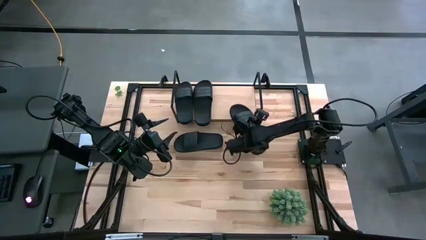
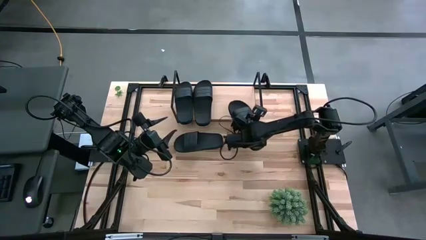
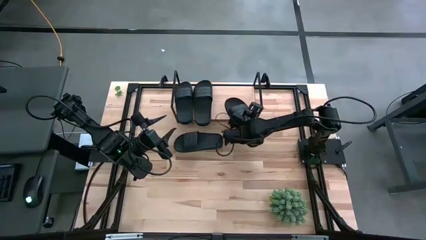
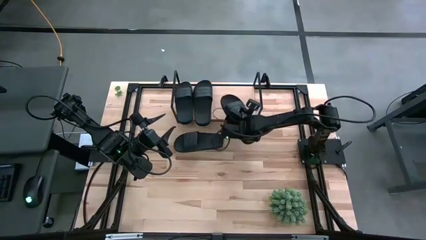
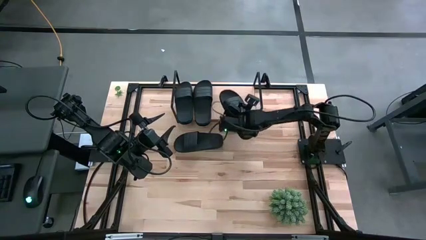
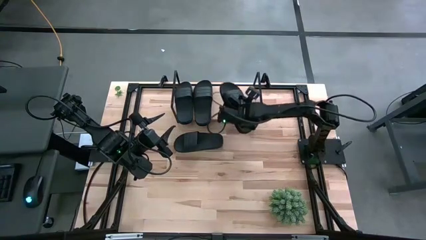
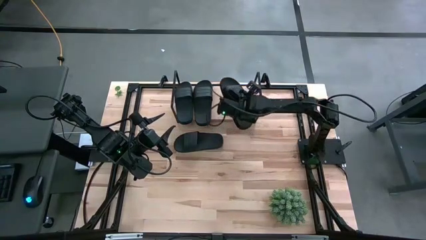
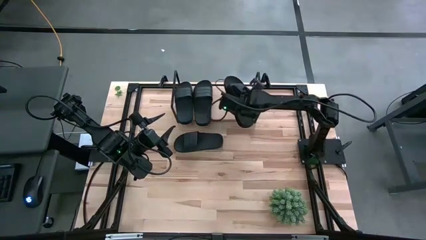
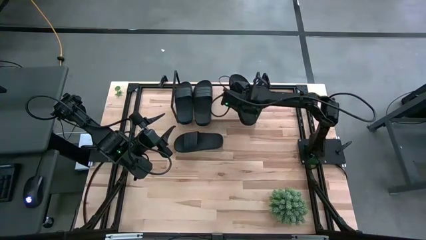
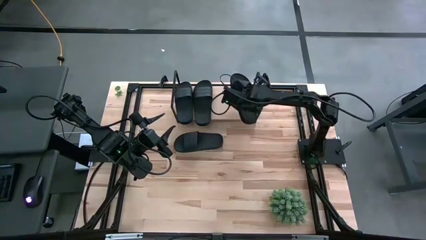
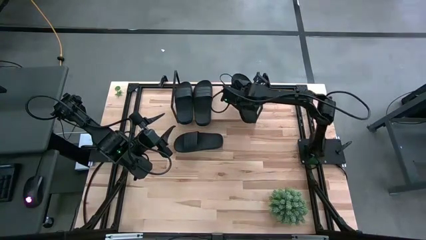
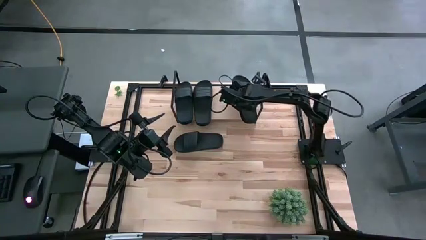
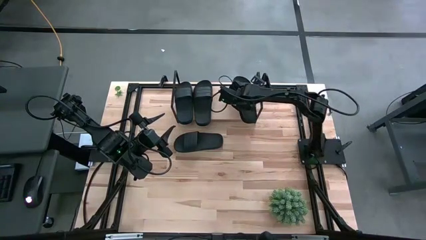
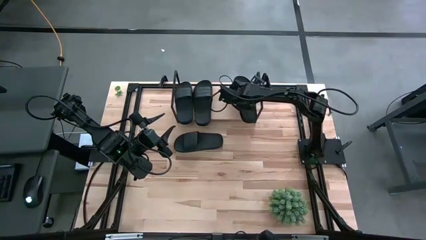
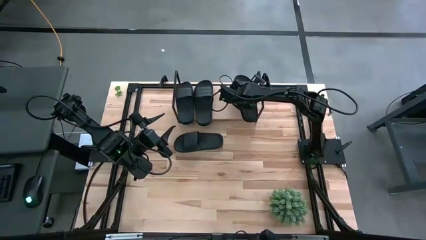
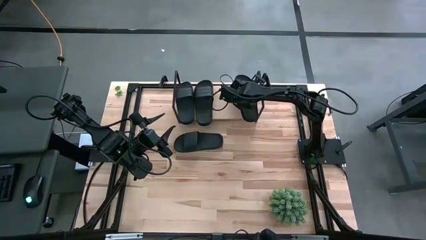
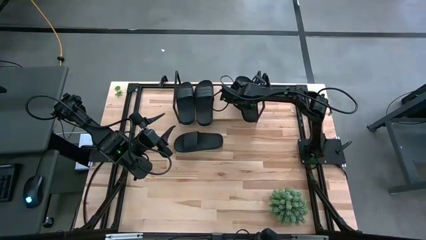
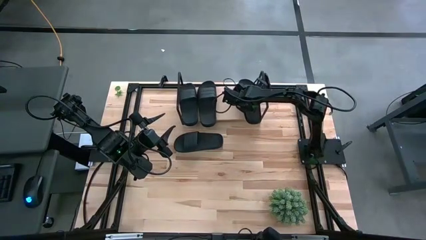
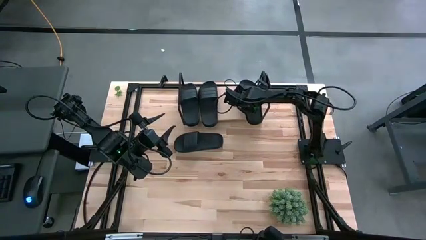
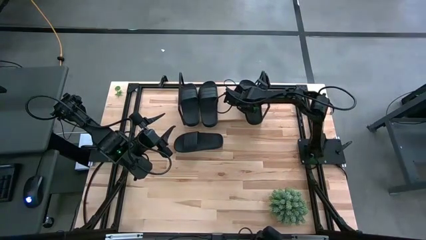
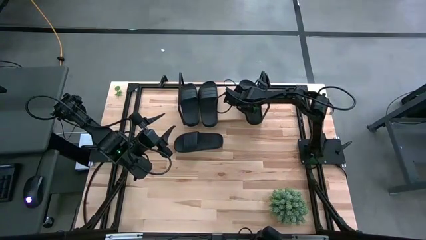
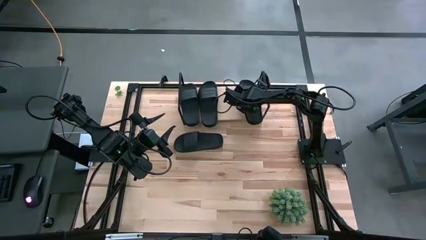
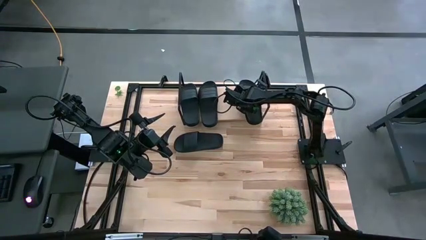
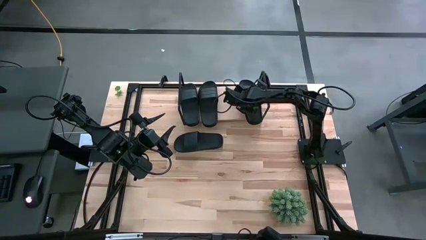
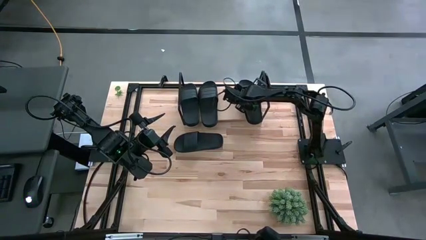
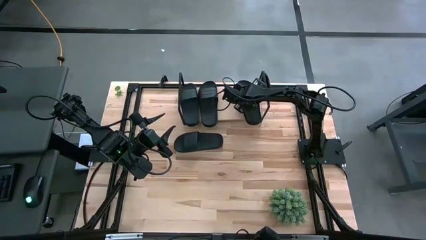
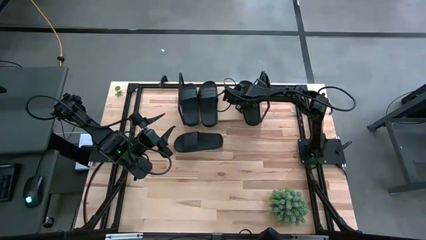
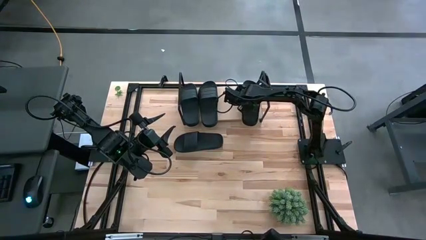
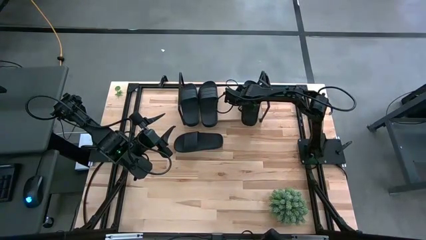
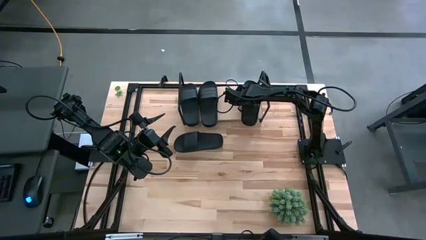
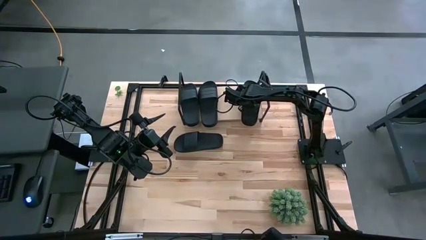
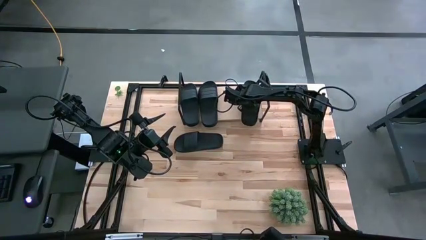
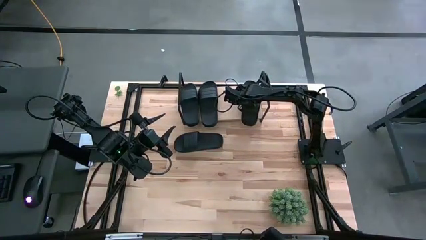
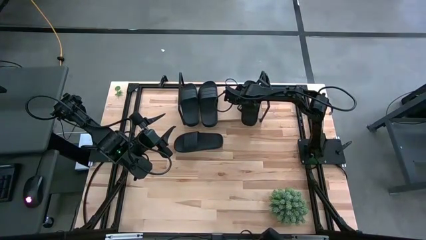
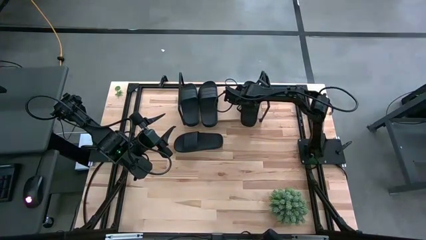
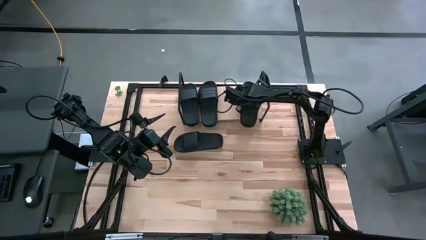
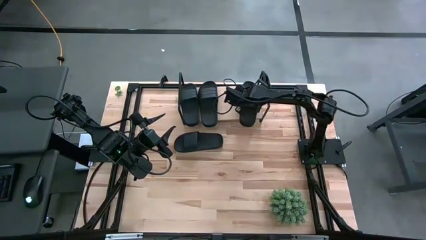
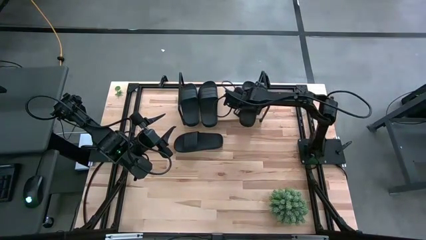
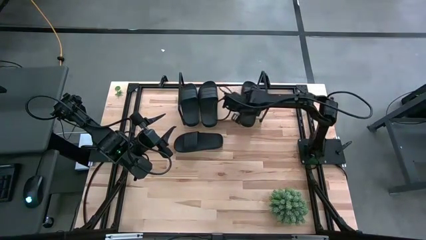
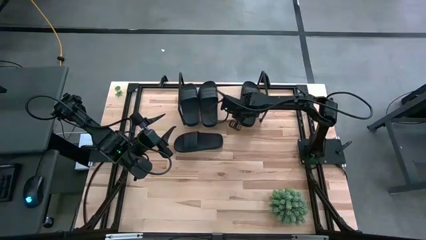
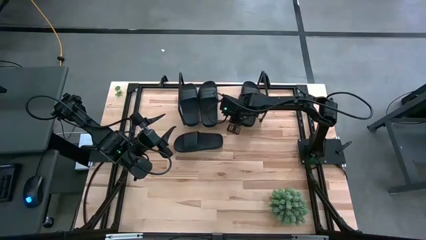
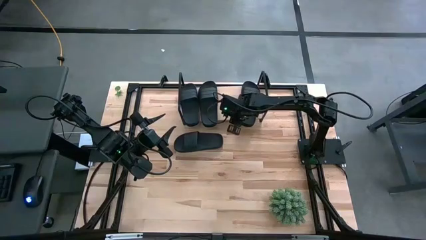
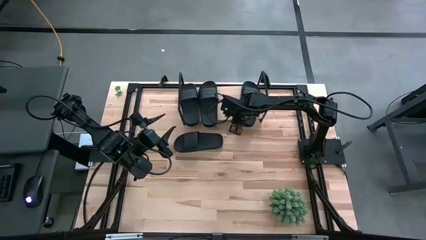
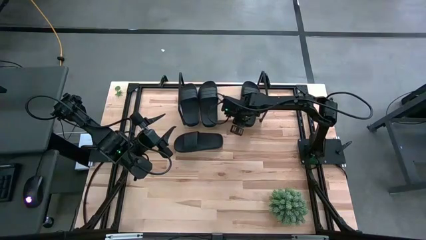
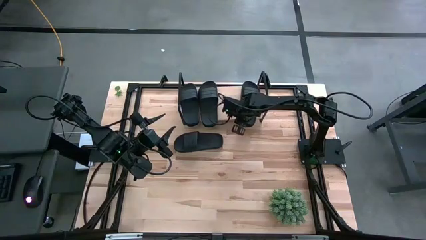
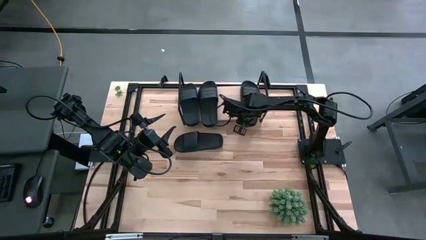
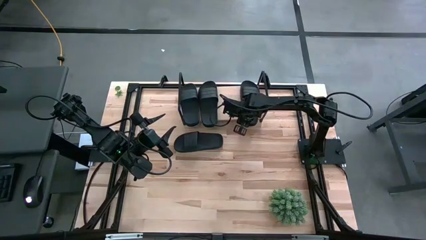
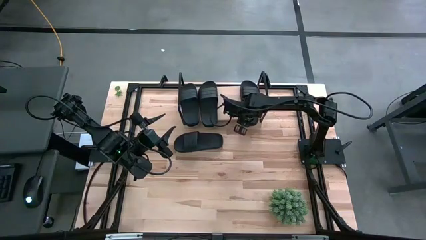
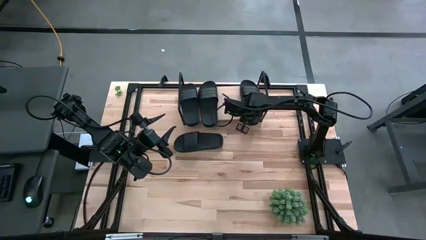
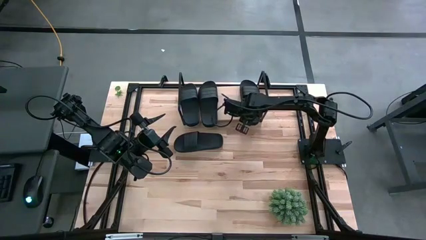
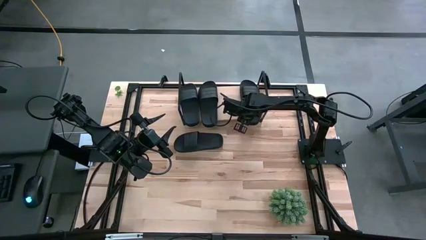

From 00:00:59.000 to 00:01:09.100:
Task: Pick and place slides into the shelf
Put the black slipper on the shelf
